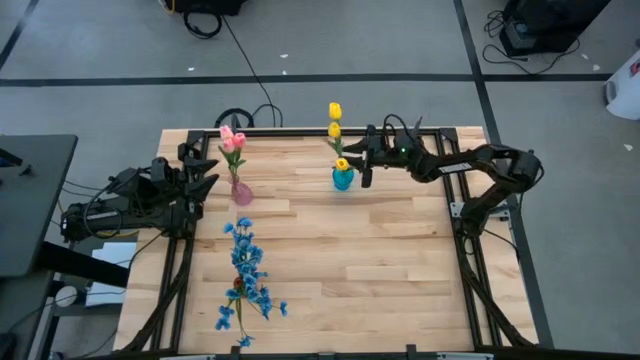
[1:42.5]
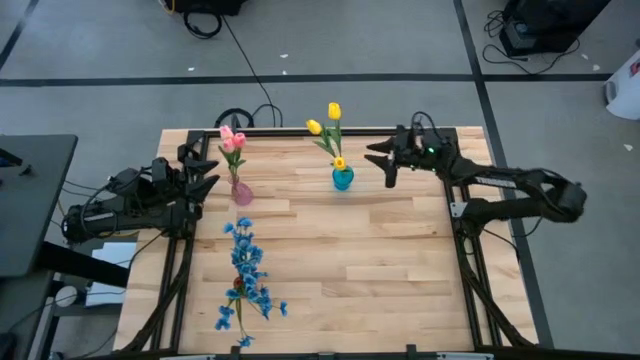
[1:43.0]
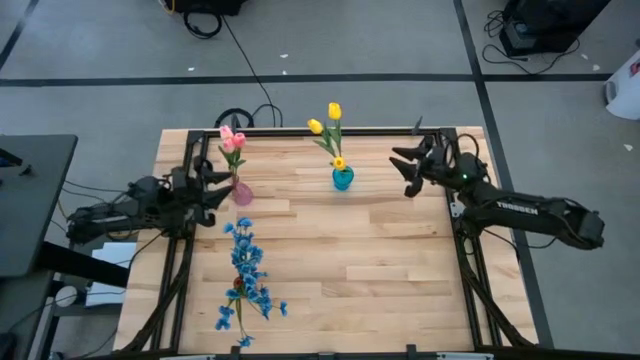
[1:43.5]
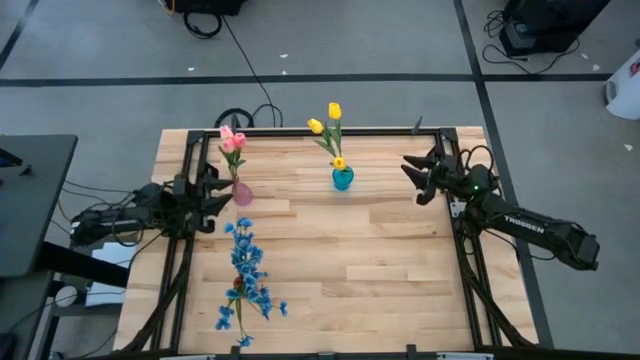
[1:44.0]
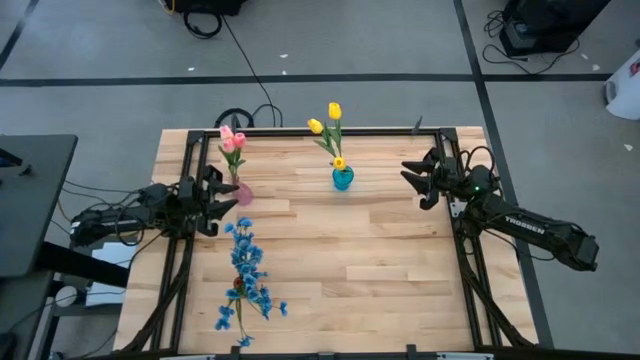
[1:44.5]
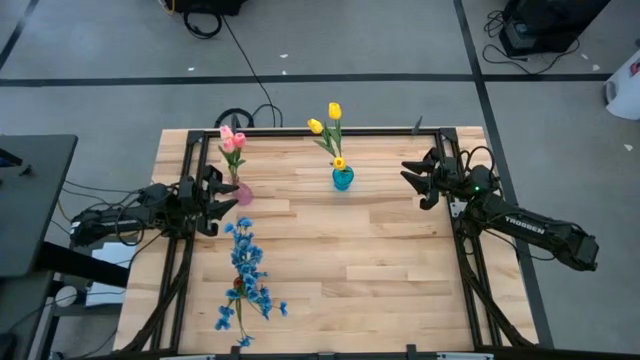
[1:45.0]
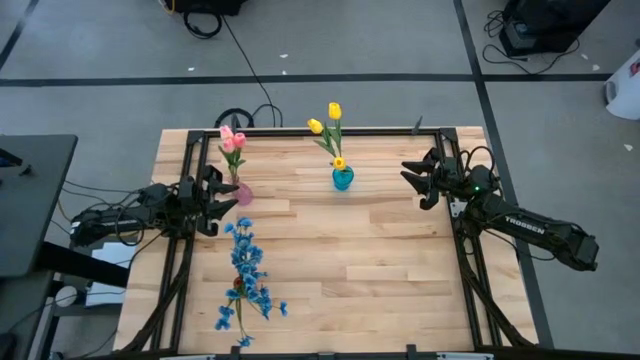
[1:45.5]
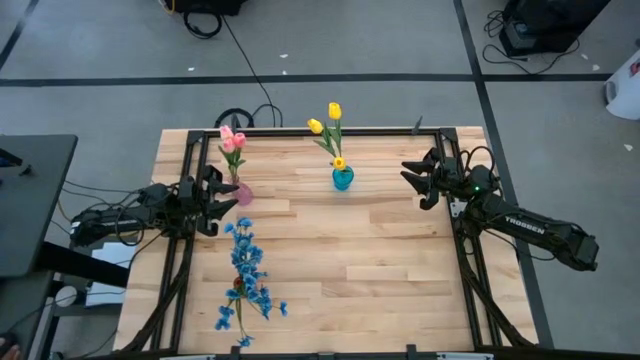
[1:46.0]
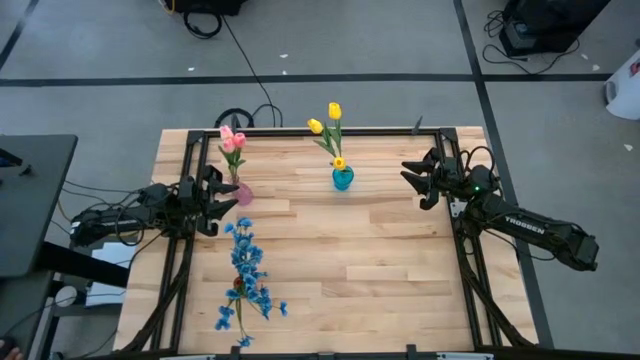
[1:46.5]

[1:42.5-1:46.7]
Task: Sort flowers into vase by color
Return to Home Position

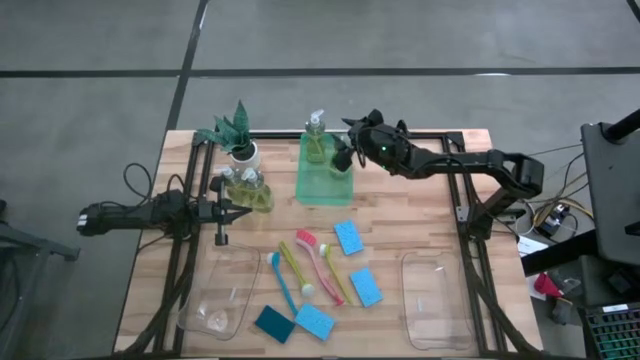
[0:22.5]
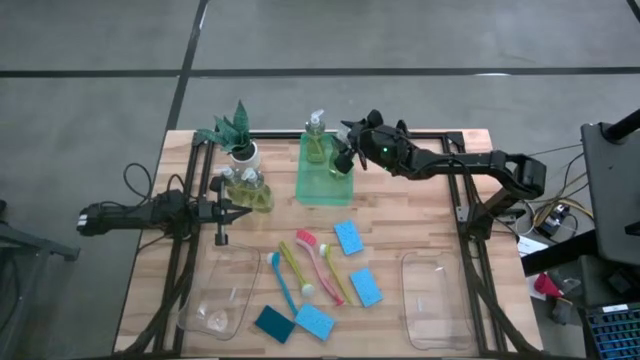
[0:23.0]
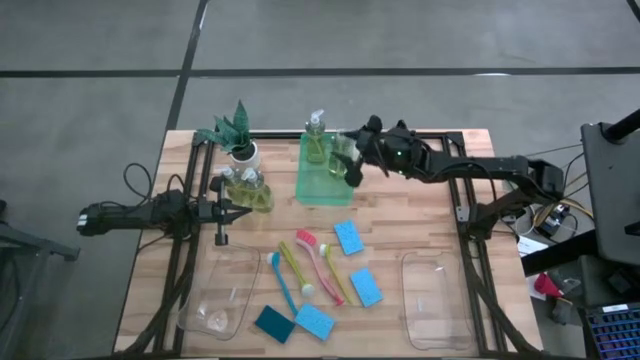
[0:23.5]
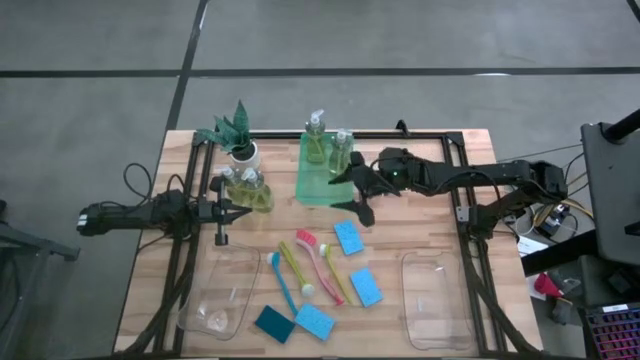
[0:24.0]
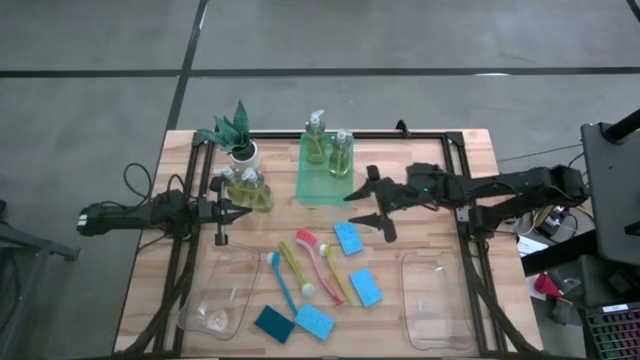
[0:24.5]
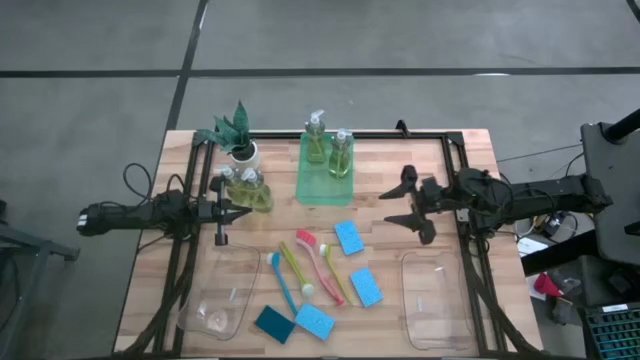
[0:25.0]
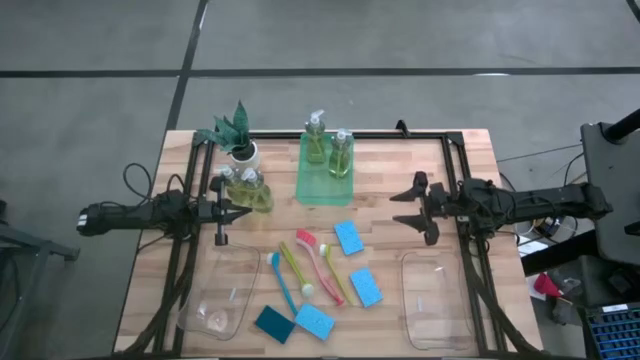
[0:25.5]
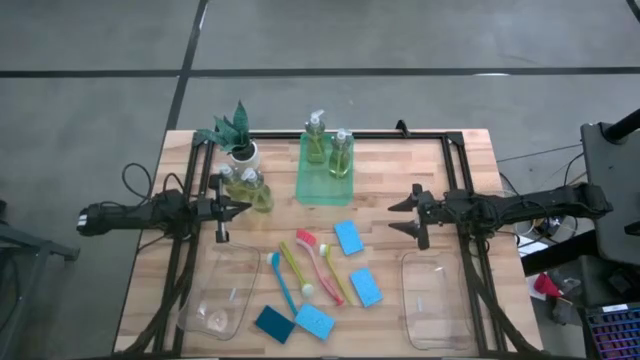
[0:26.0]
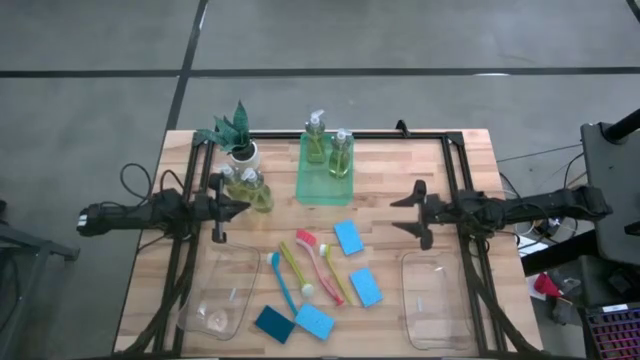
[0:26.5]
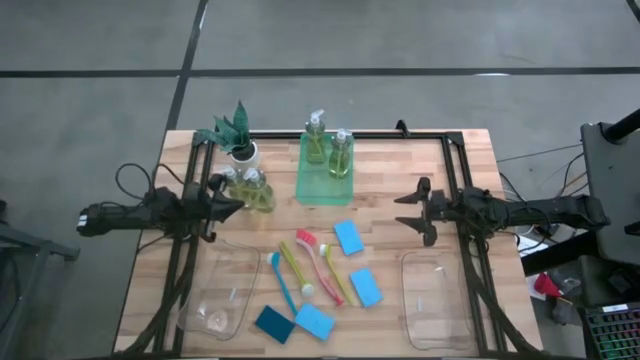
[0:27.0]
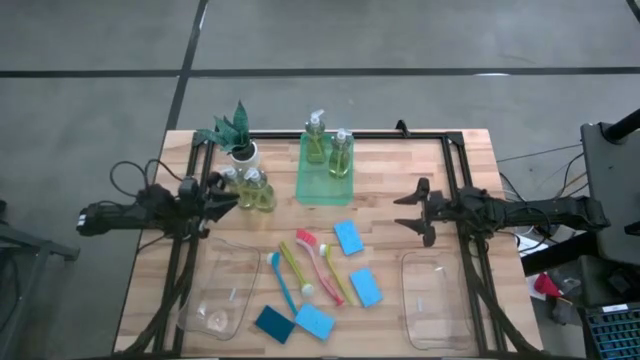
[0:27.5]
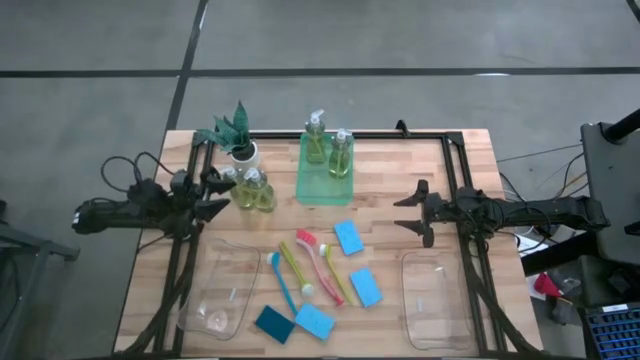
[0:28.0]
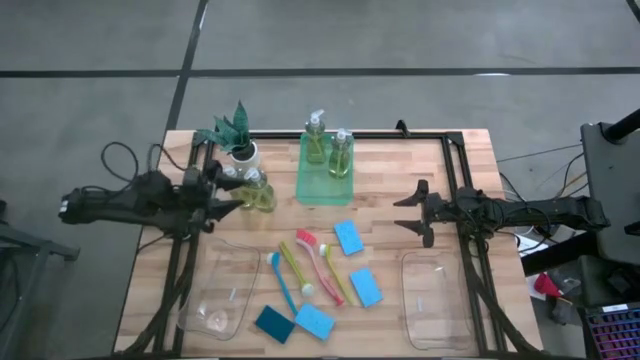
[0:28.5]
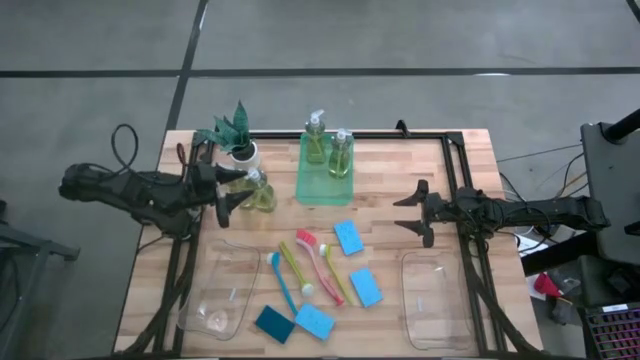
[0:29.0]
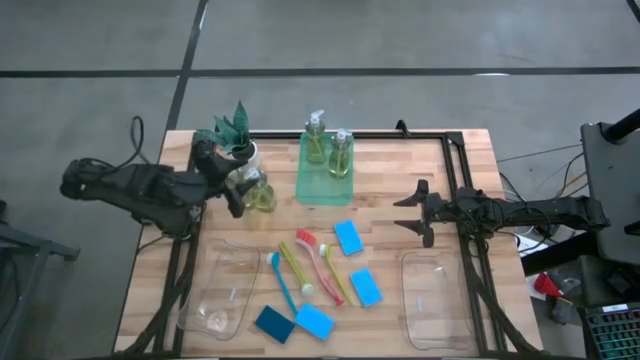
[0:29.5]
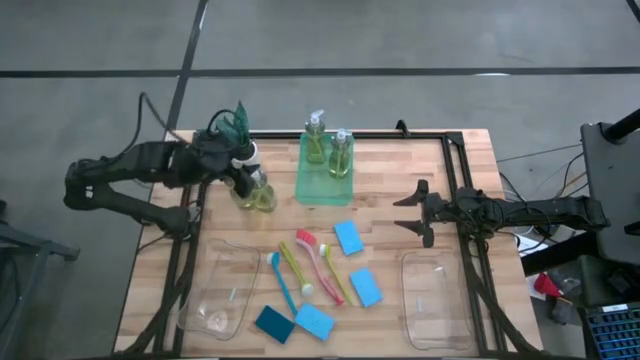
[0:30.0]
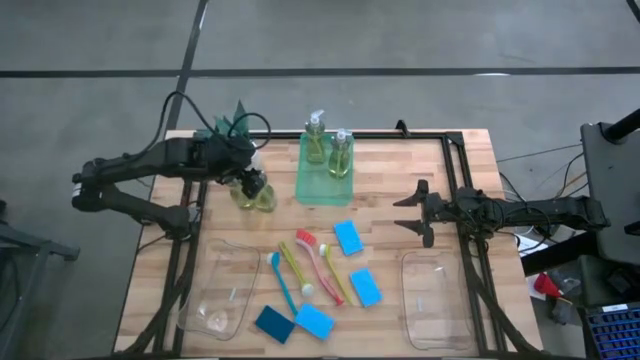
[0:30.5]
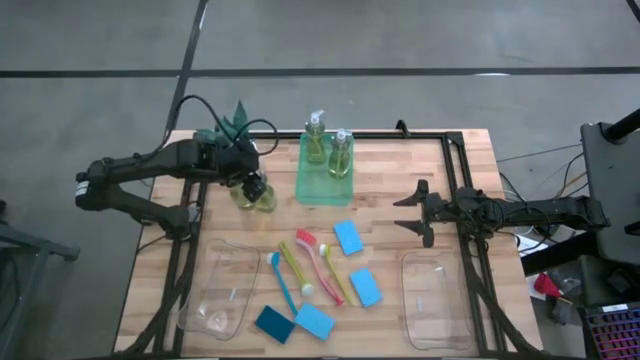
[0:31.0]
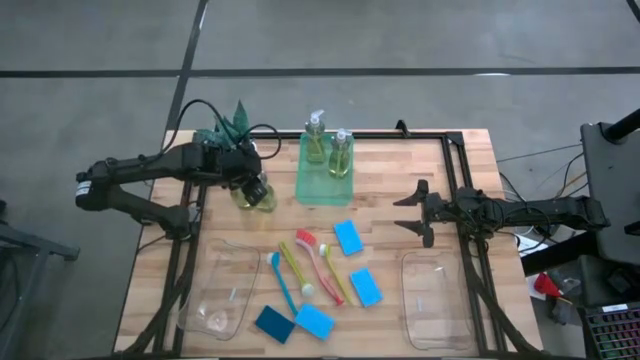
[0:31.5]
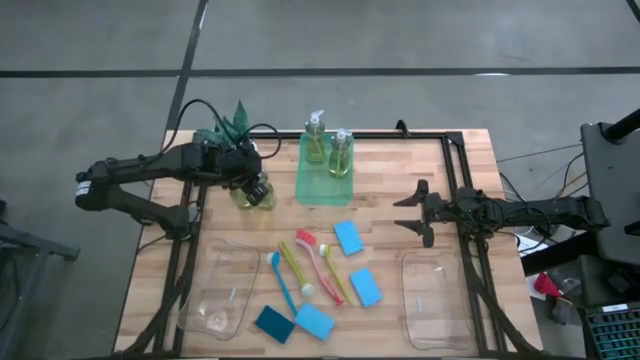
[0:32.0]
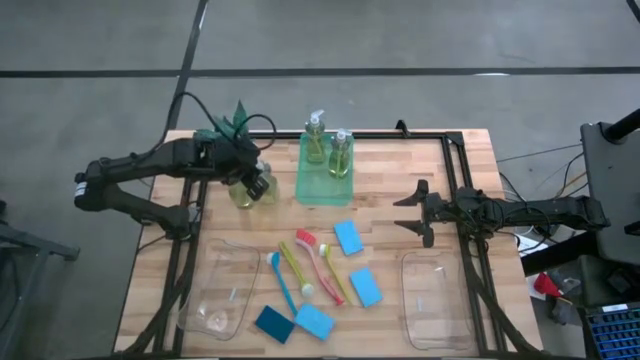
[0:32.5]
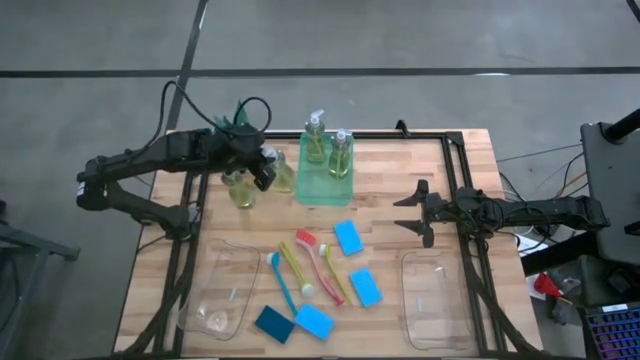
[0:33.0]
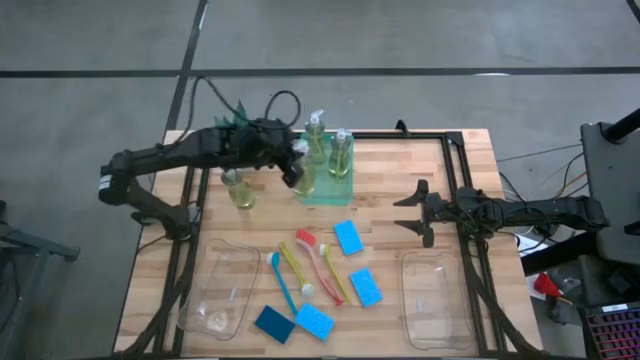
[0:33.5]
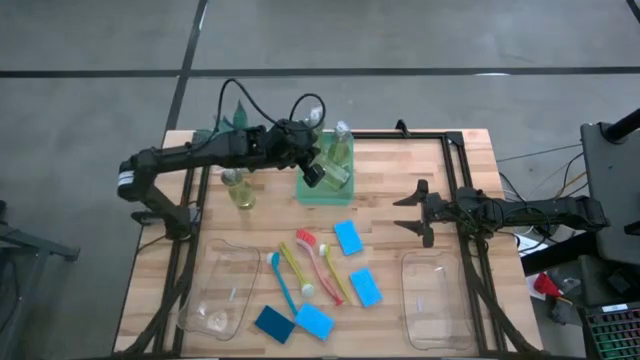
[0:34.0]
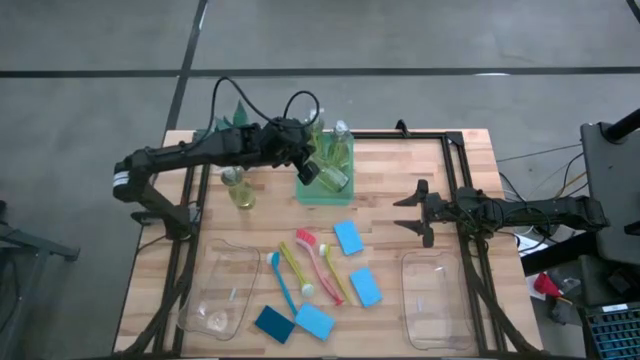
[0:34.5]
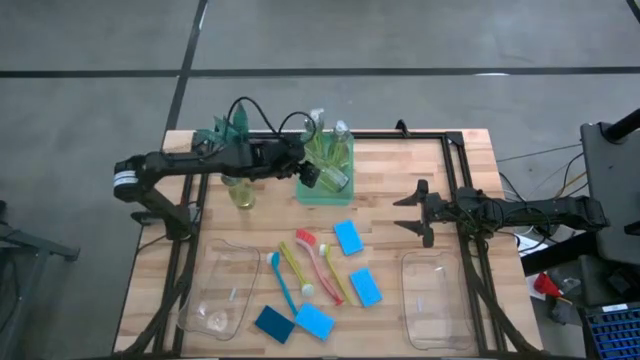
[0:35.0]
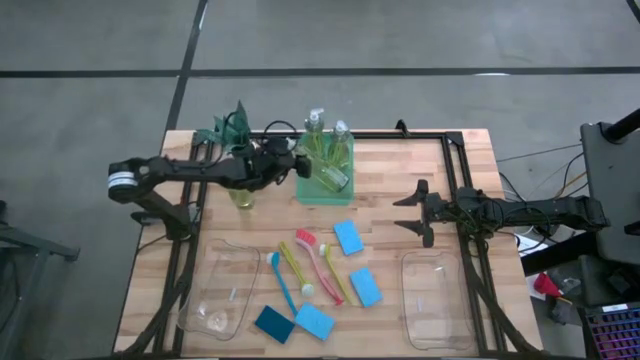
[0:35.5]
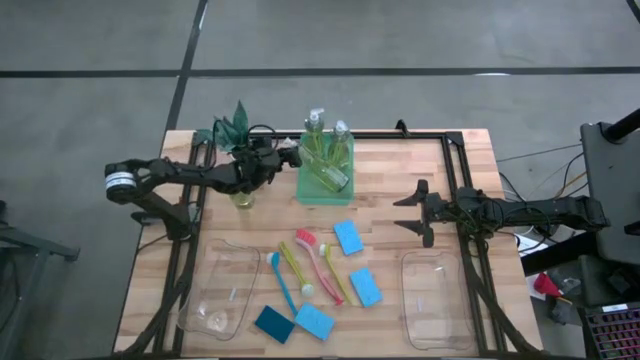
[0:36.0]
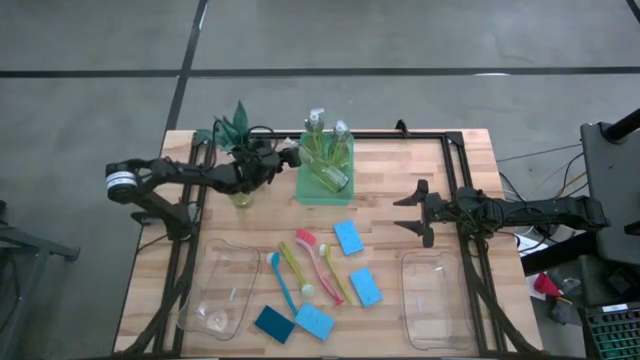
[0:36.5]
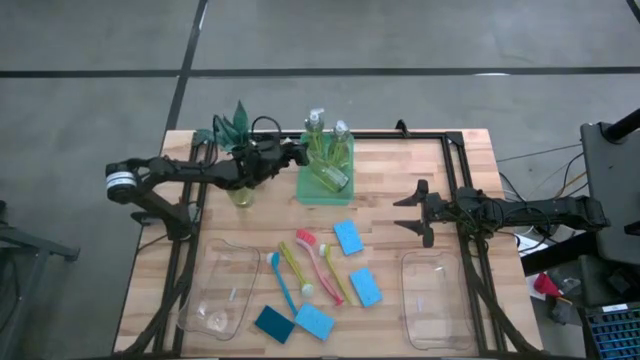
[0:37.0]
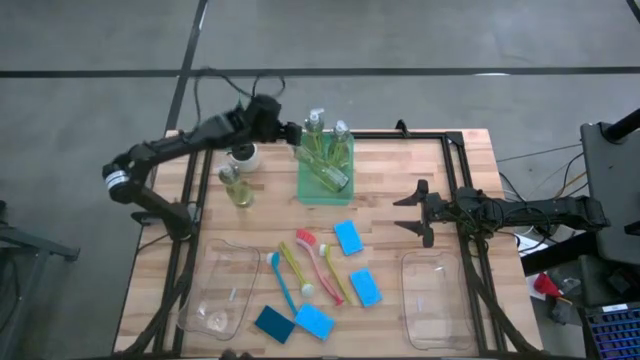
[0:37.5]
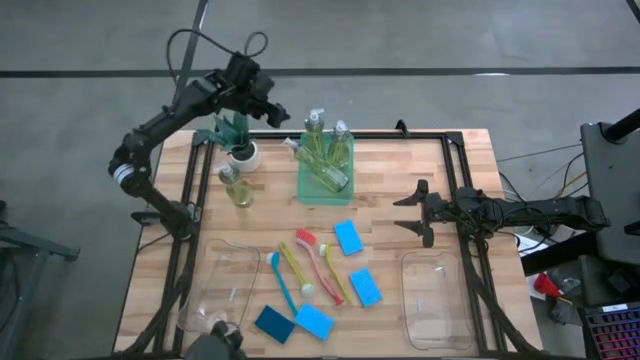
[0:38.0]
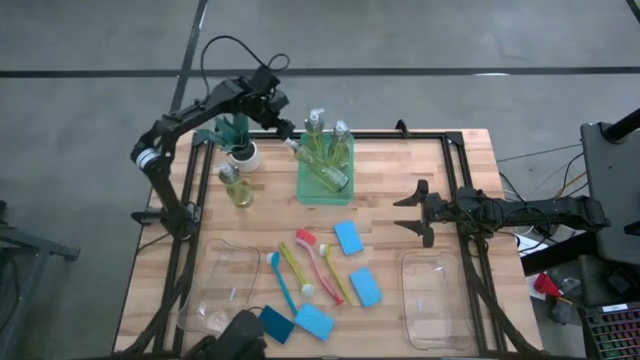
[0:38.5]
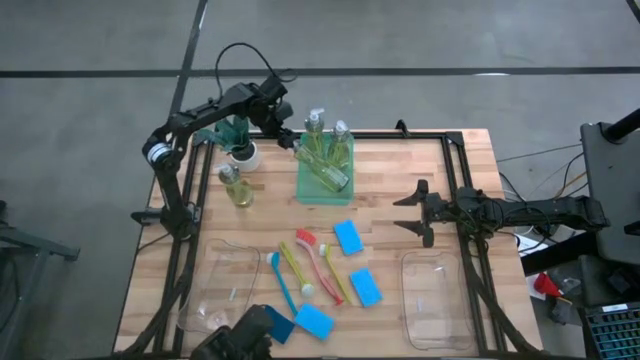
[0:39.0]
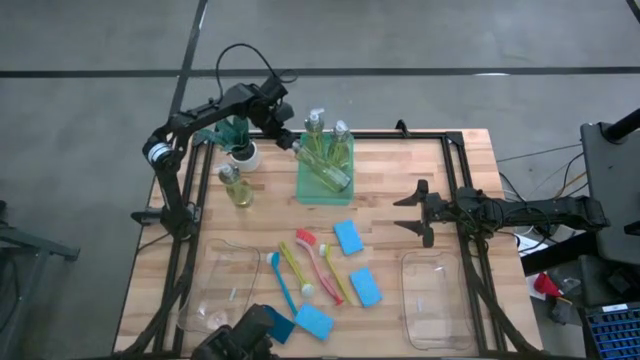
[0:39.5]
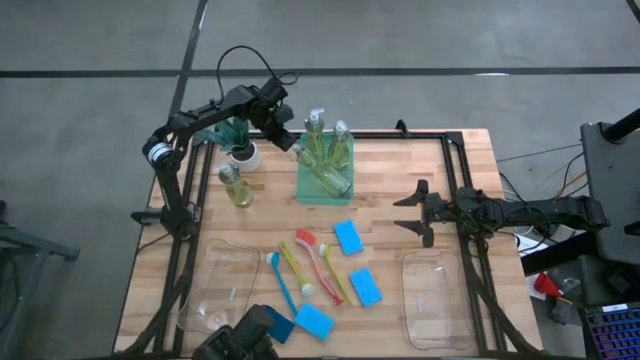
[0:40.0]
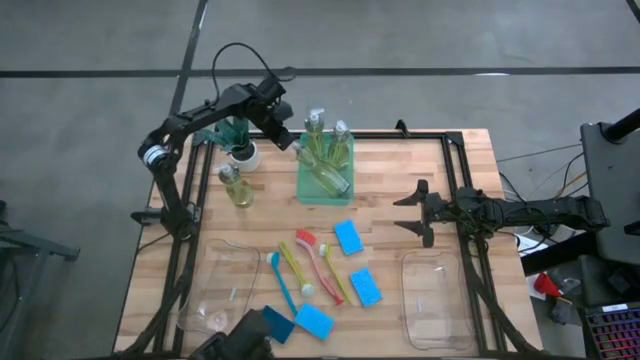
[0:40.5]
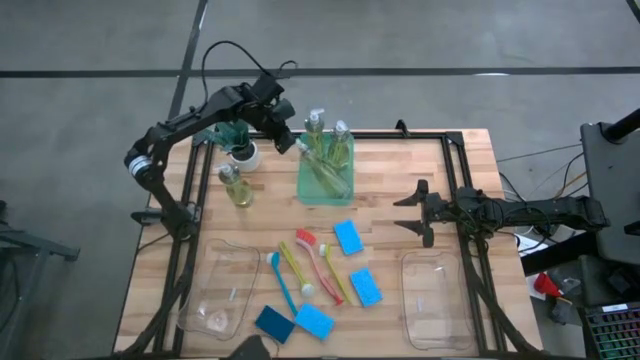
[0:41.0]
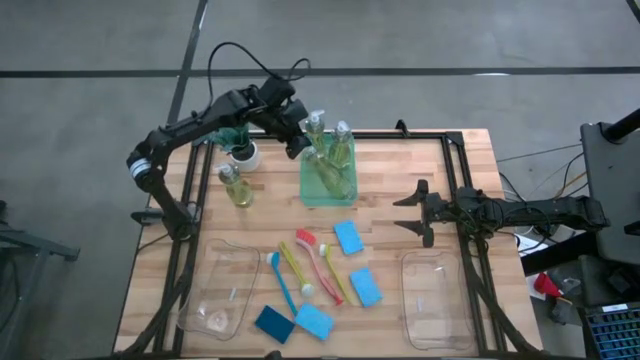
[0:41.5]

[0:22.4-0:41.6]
Task: Pick & Place Kitchen Sink Supplies
Put the right dishwashing liquid into the green bin
